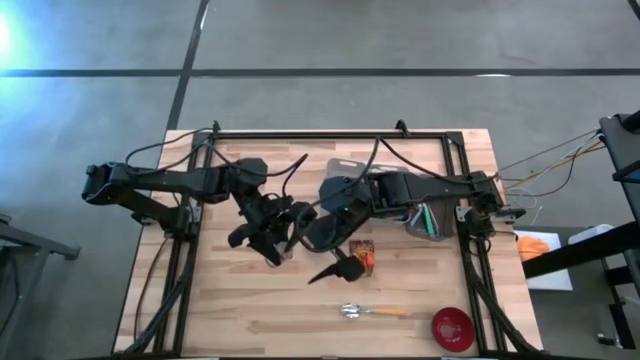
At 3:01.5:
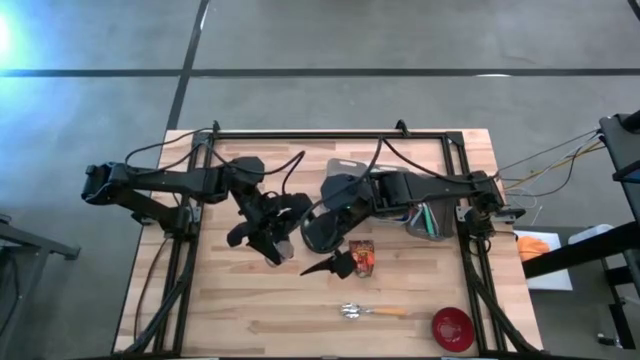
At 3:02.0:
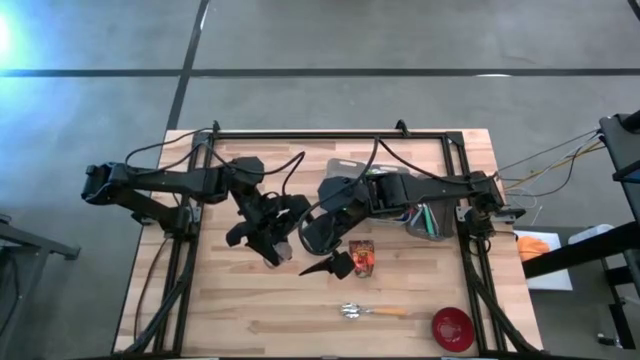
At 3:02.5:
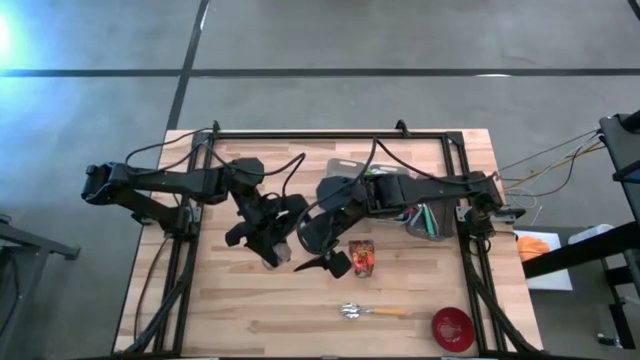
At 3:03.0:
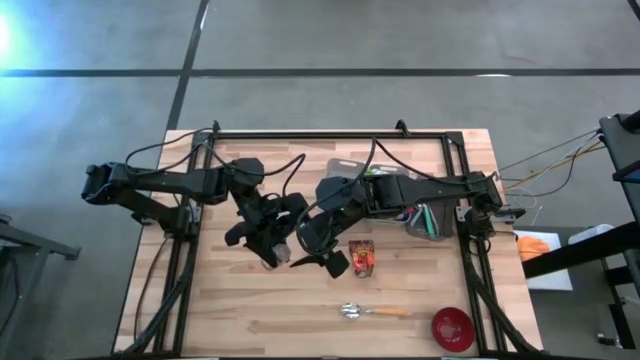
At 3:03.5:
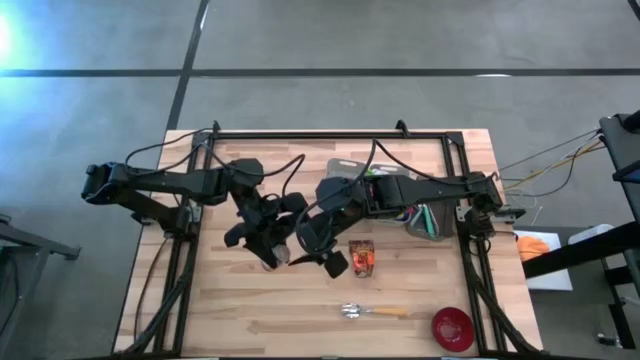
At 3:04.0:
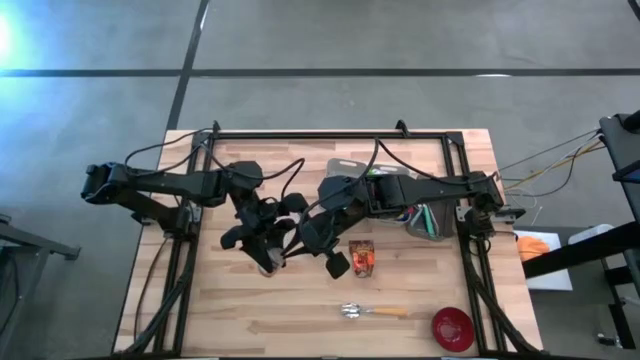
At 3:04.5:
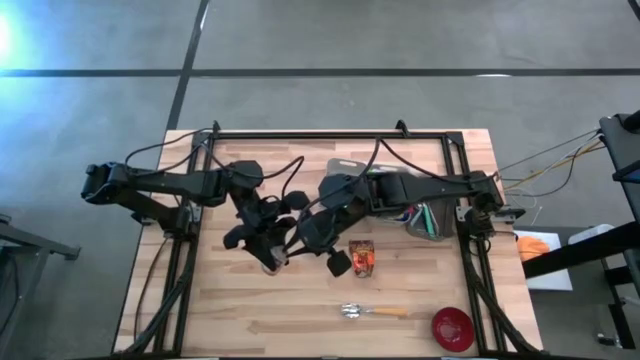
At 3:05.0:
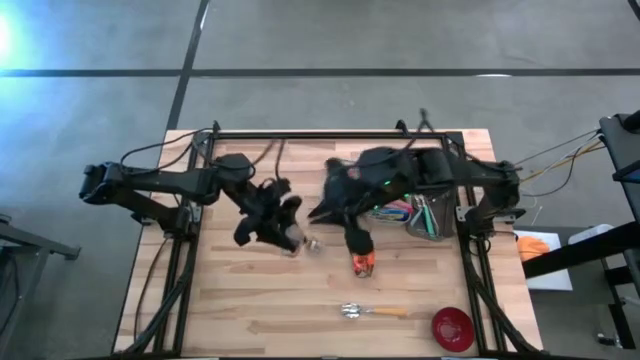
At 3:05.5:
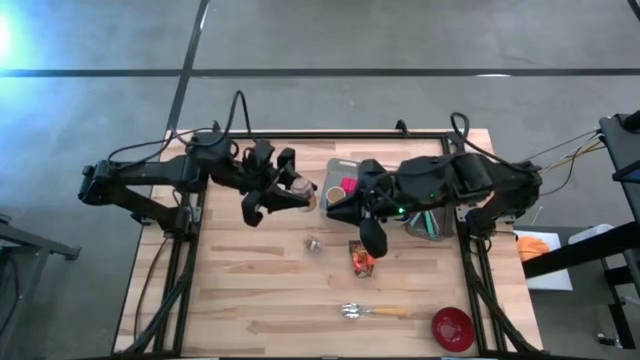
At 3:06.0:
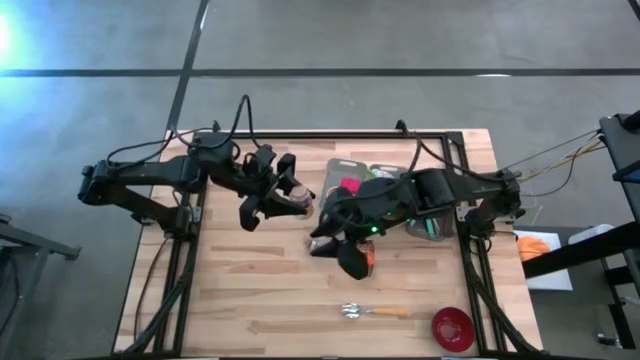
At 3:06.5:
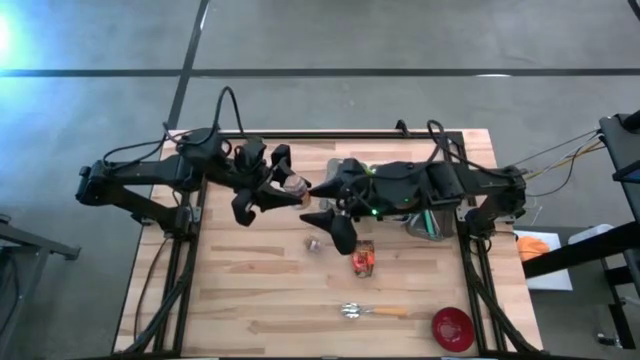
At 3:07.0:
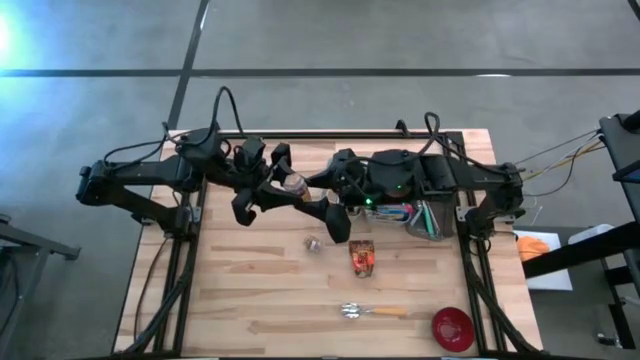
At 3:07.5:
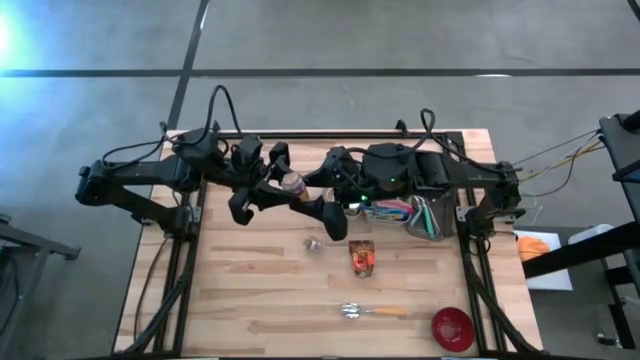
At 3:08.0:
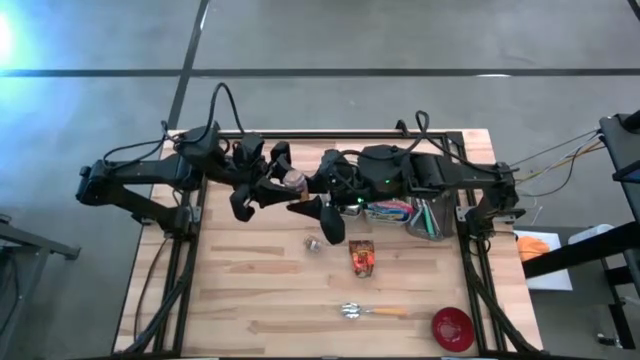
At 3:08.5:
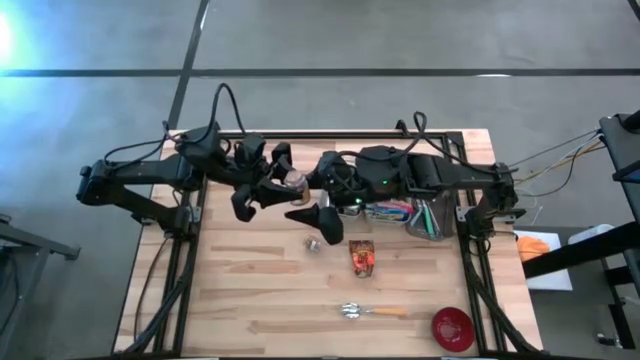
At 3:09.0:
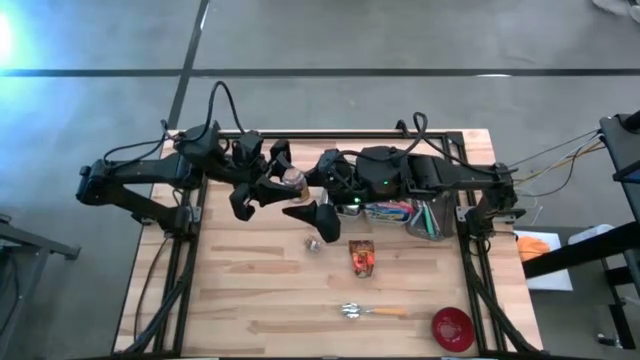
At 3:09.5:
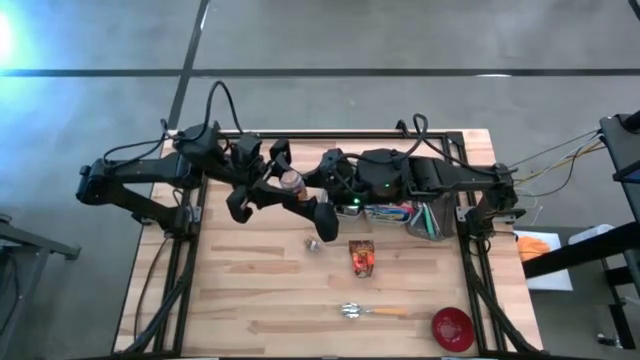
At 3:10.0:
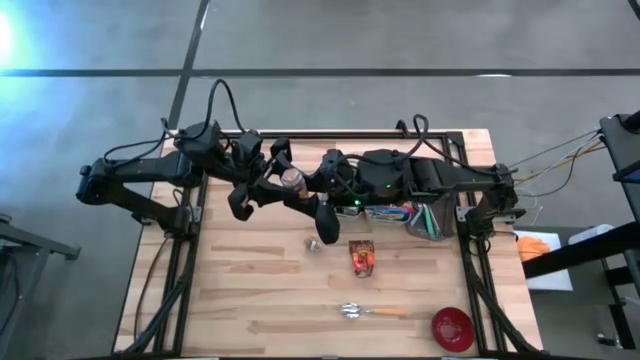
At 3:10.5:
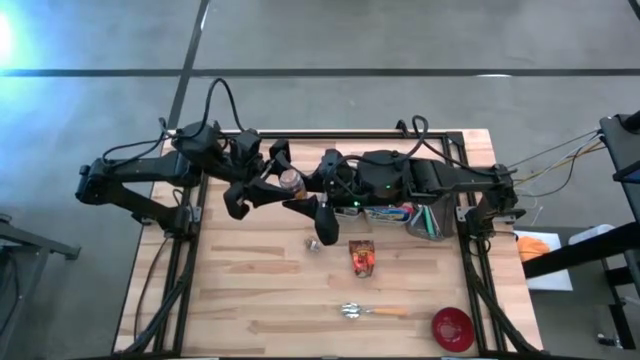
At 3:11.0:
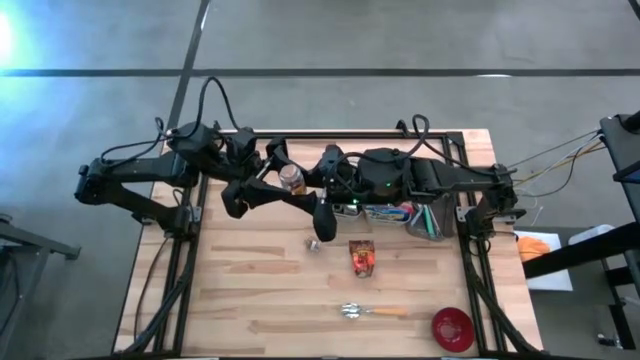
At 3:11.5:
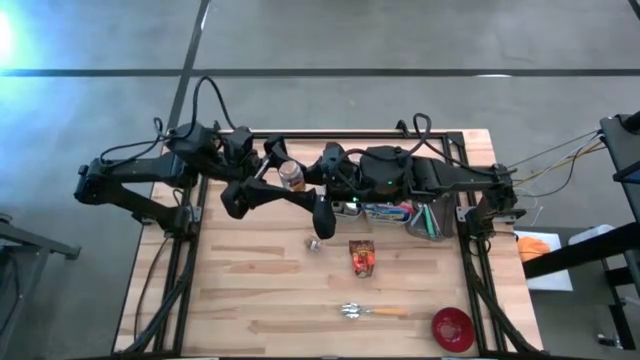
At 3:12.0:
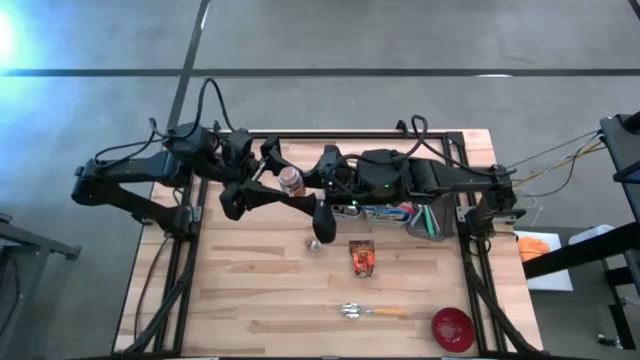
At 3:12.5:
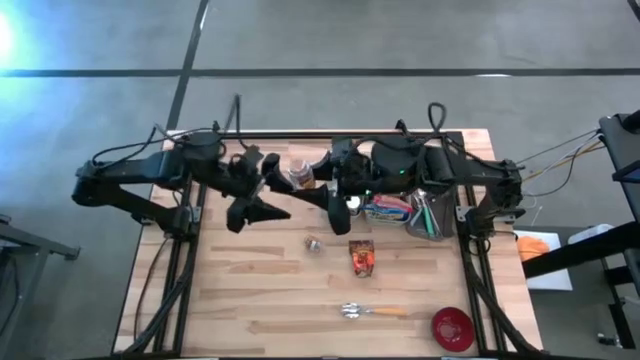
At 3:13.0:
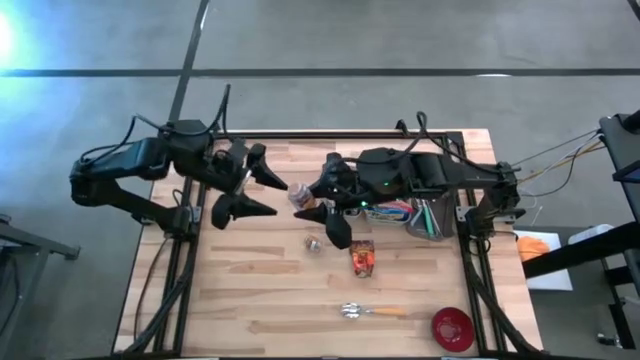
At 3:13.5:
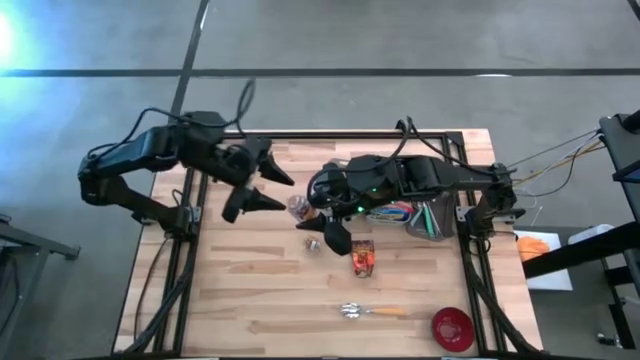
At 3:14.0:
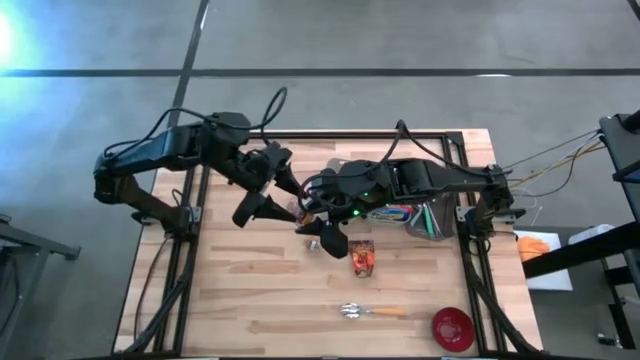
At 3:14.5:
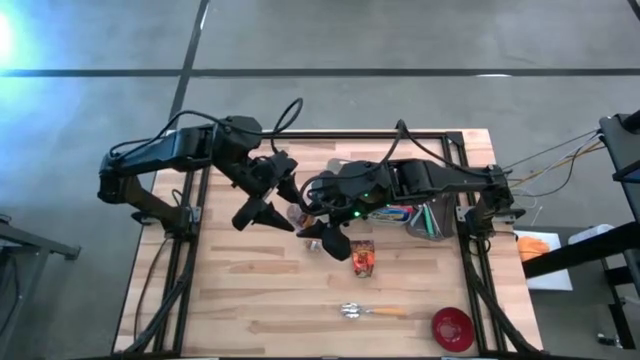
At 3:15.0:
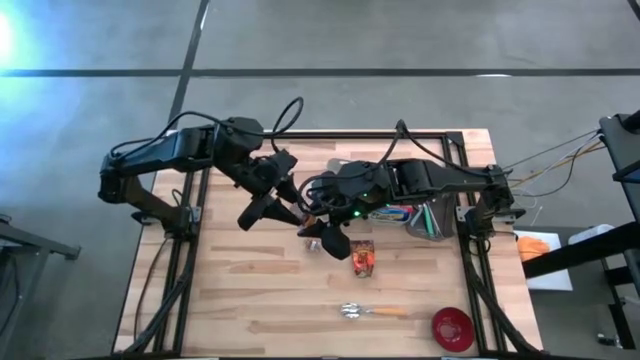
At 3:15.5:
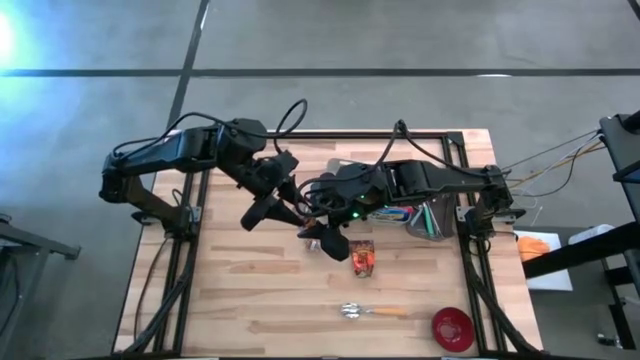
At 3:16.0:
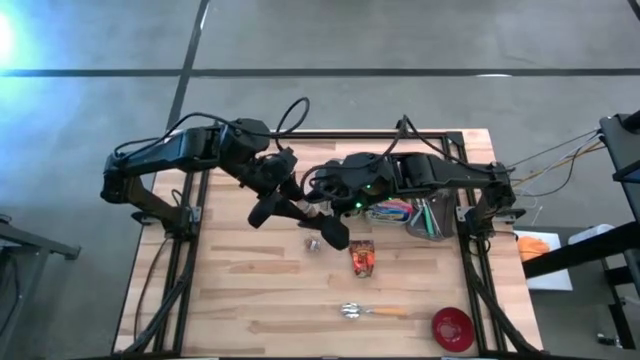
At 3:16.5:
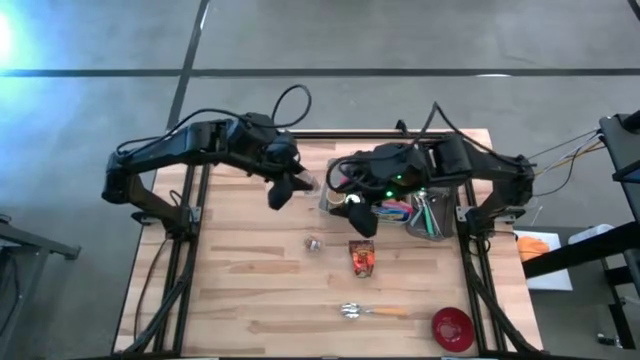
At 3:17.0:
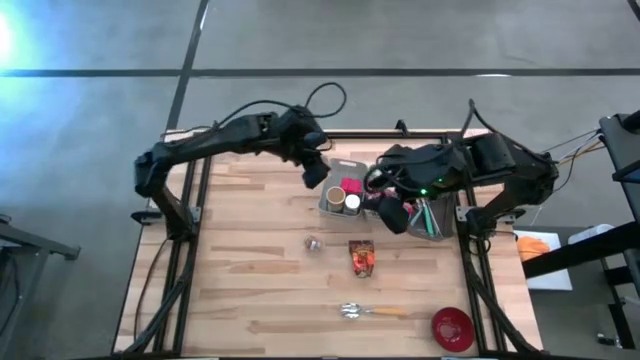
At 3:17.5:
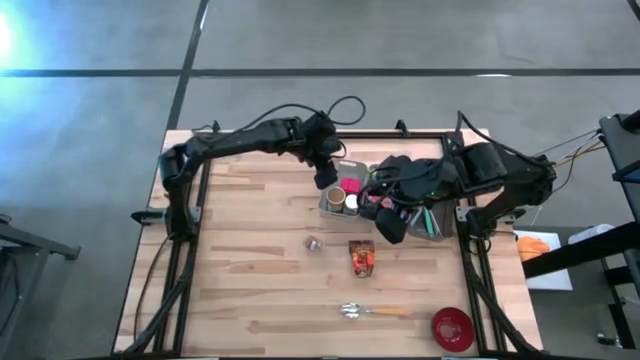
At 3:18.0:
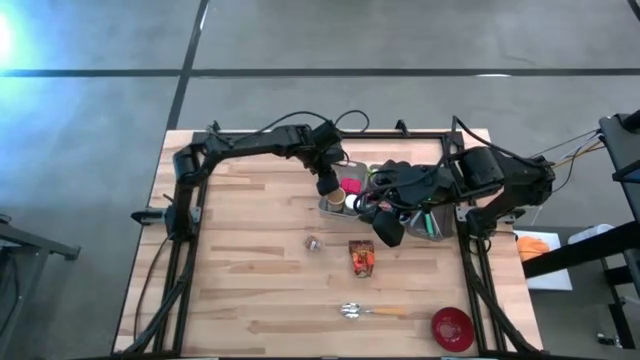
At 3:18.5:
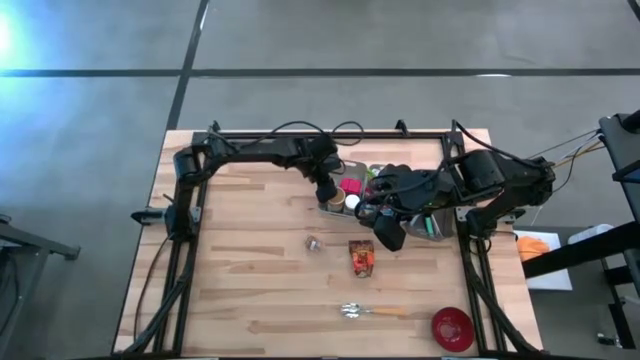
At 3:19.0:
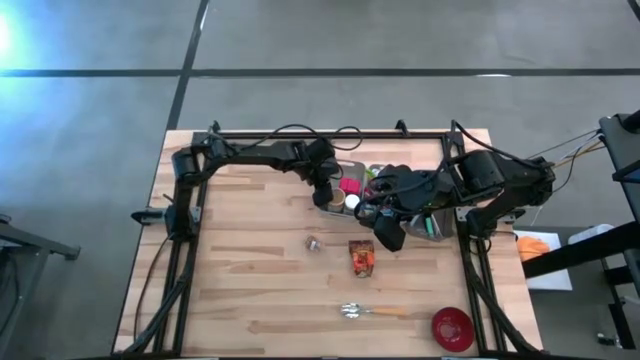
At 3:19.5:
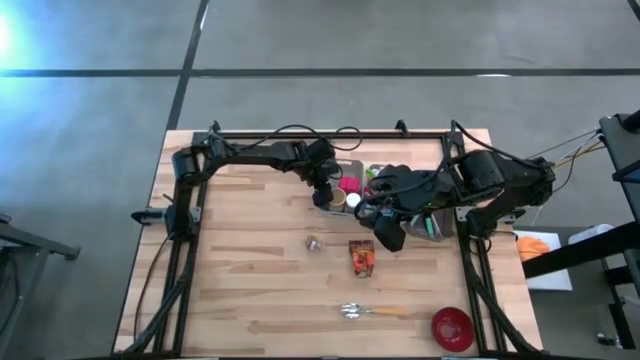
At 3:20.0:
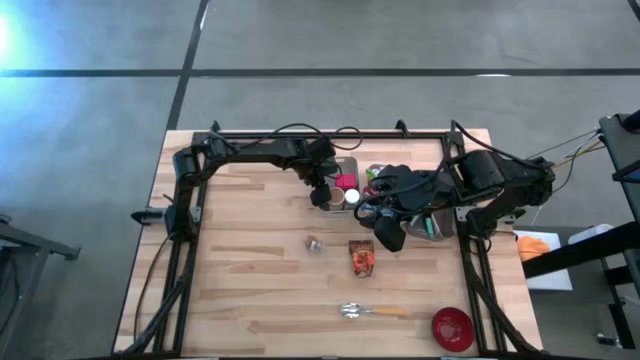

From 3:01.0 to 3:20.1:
Put the bottom brown seasoning bottle into the left gray bin
